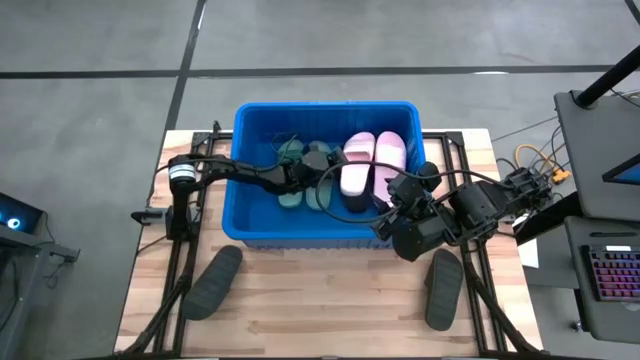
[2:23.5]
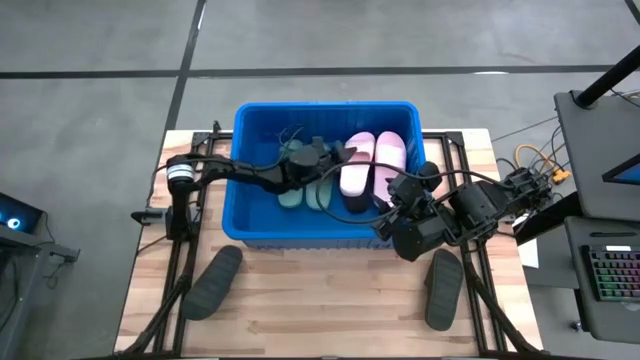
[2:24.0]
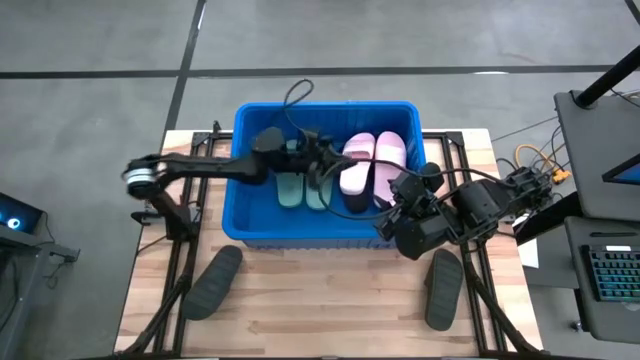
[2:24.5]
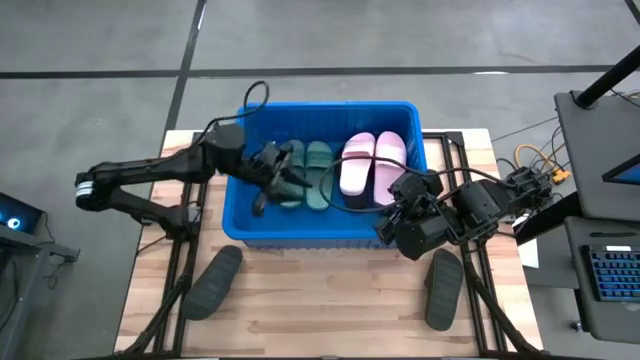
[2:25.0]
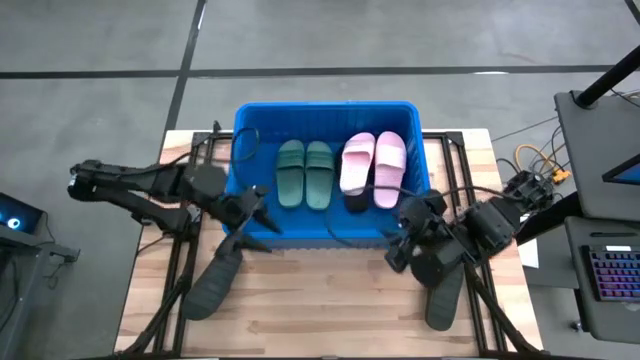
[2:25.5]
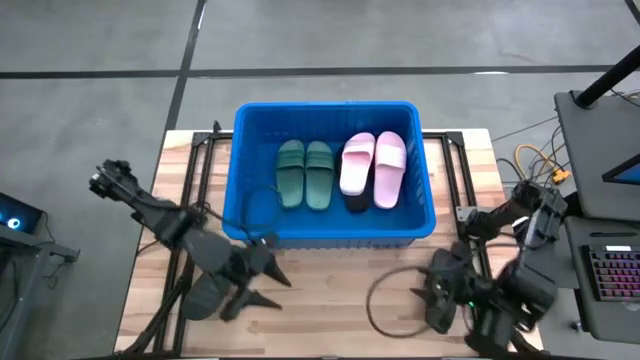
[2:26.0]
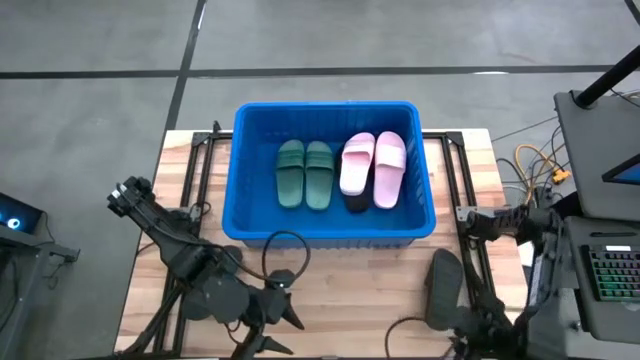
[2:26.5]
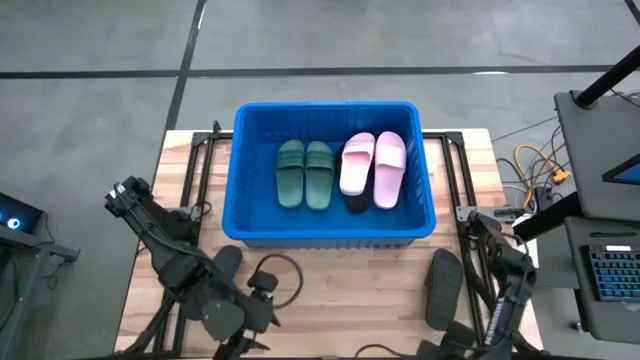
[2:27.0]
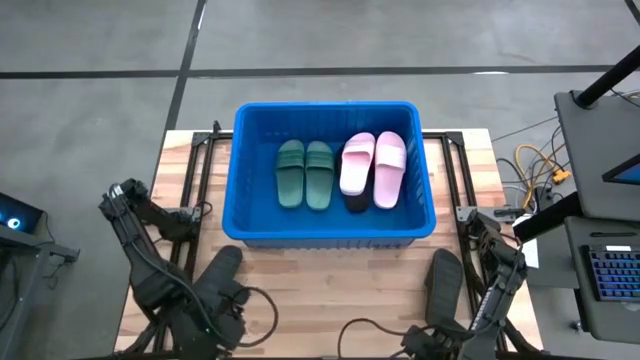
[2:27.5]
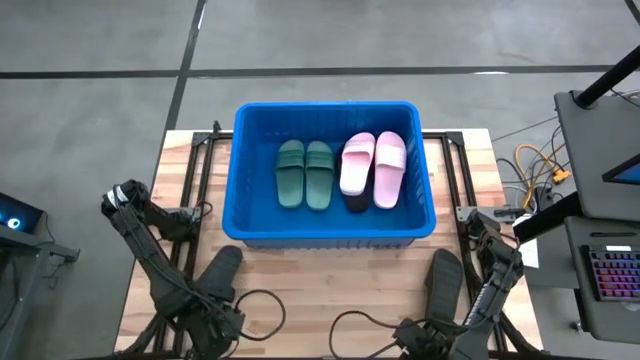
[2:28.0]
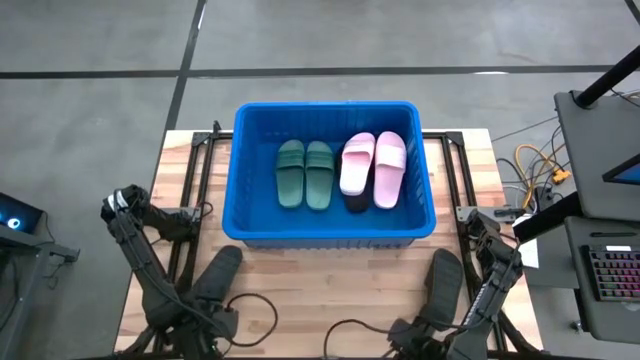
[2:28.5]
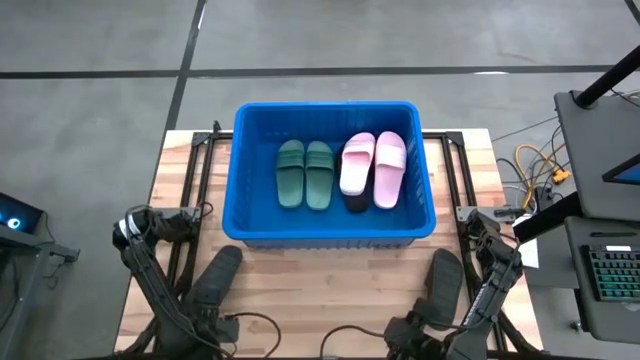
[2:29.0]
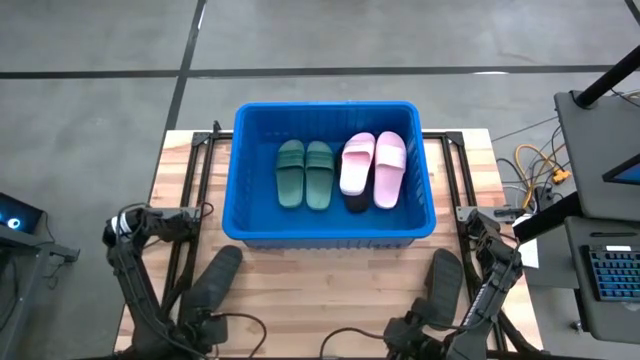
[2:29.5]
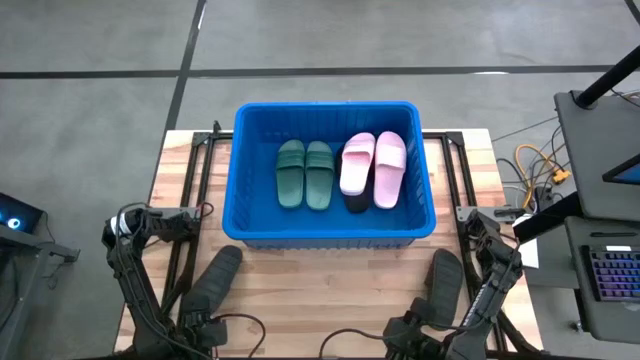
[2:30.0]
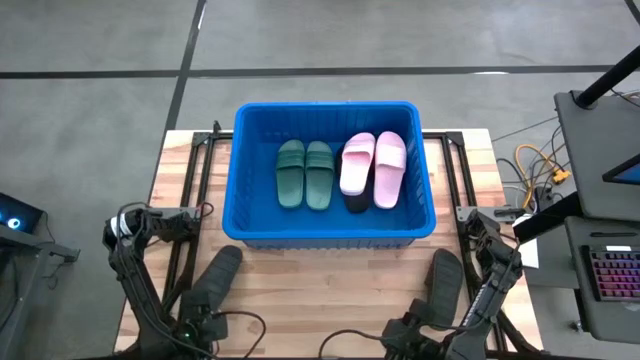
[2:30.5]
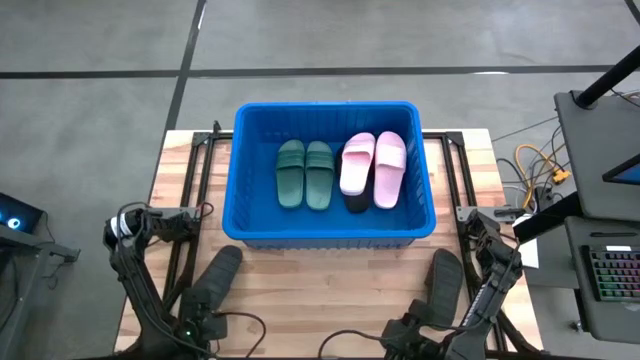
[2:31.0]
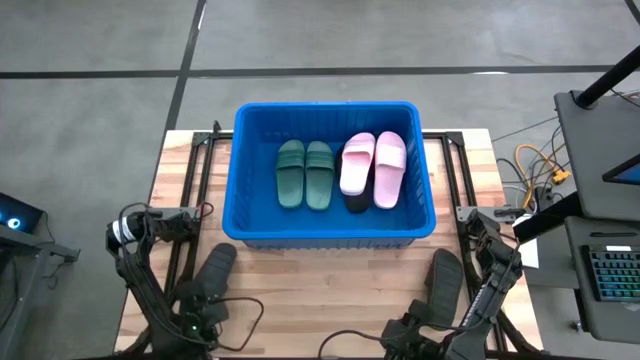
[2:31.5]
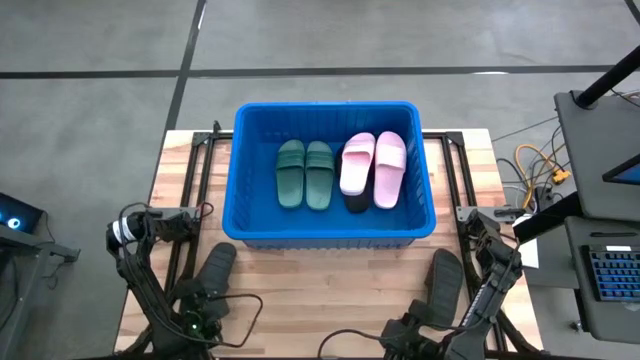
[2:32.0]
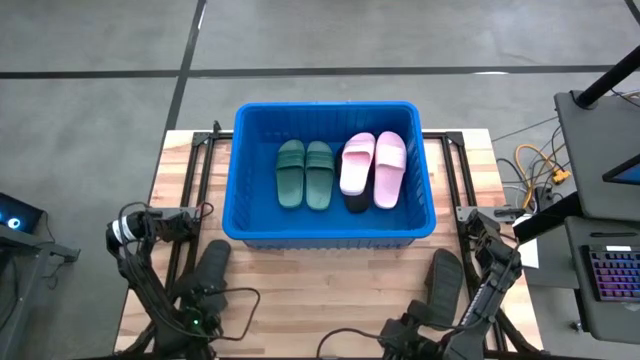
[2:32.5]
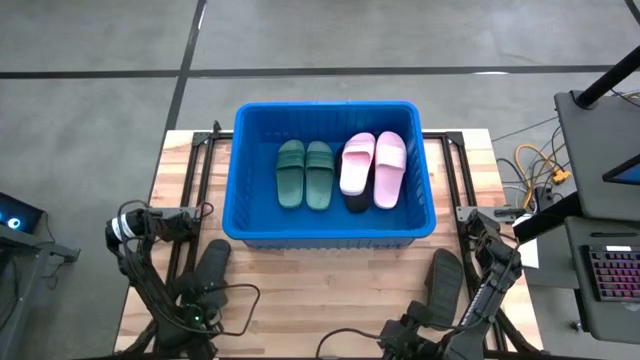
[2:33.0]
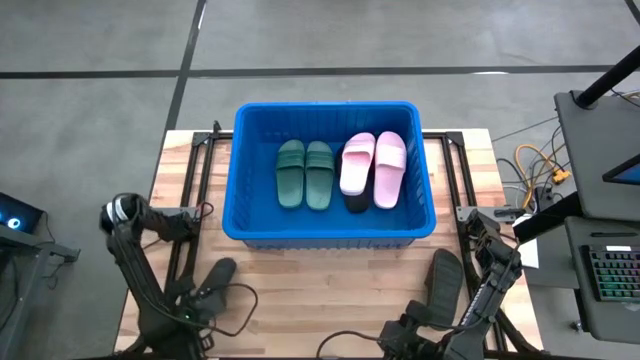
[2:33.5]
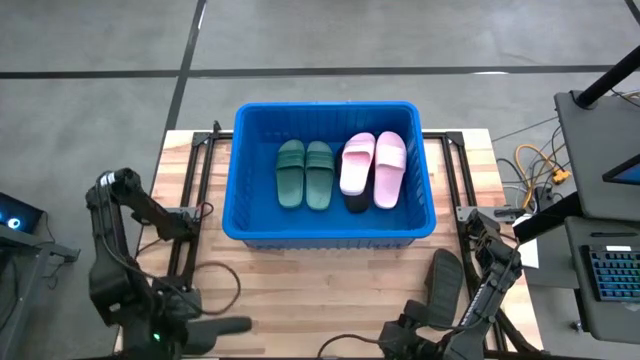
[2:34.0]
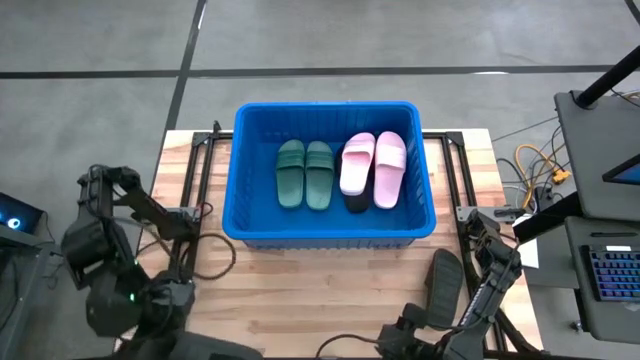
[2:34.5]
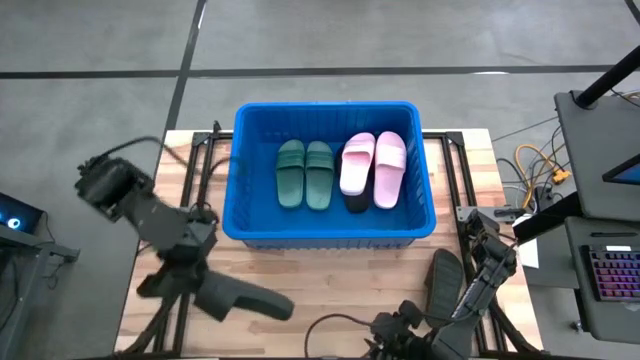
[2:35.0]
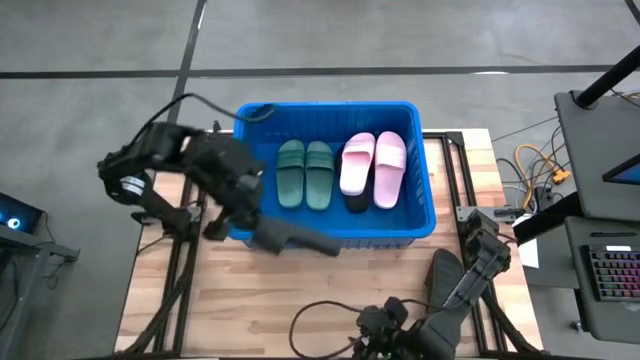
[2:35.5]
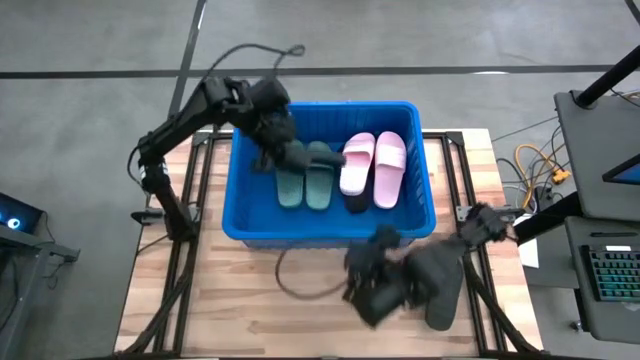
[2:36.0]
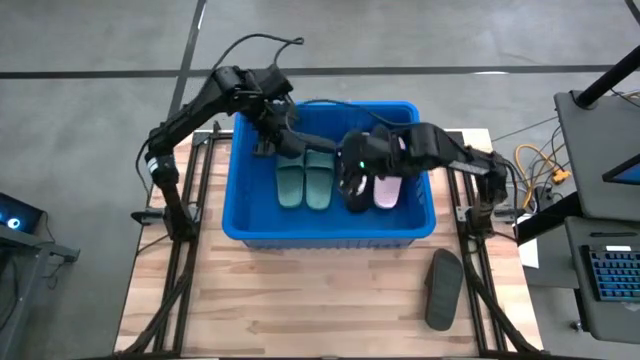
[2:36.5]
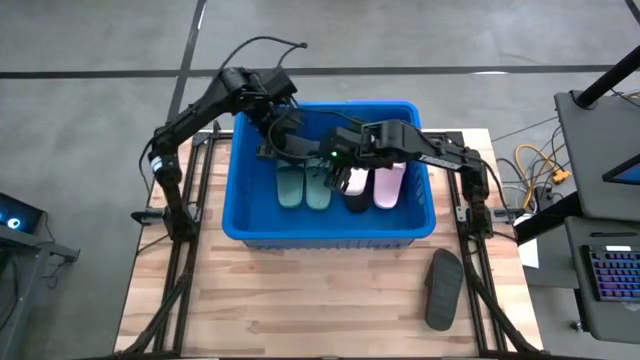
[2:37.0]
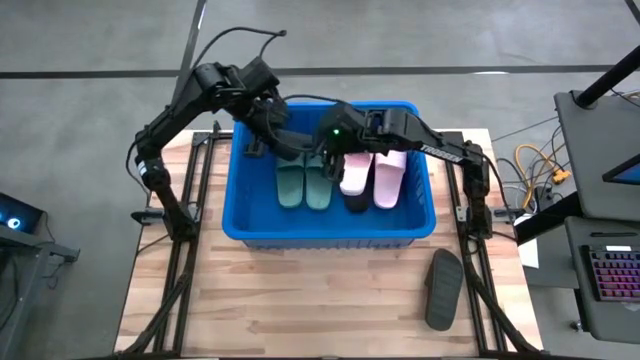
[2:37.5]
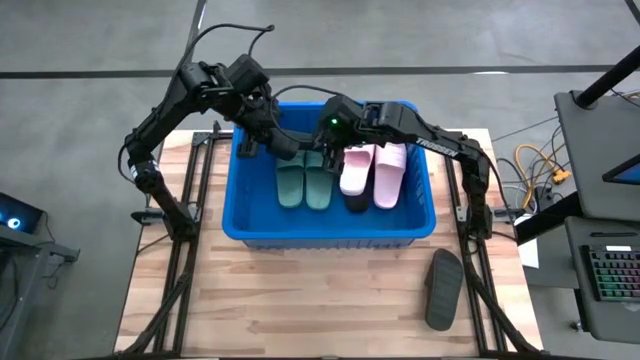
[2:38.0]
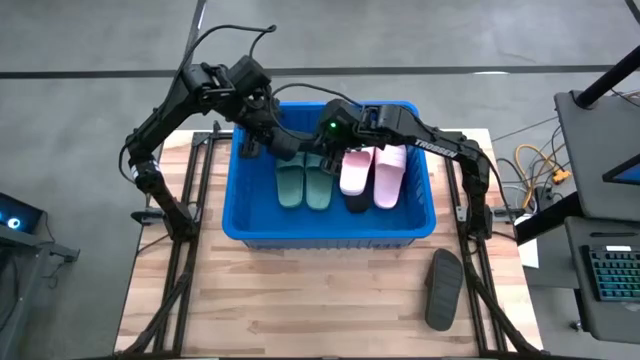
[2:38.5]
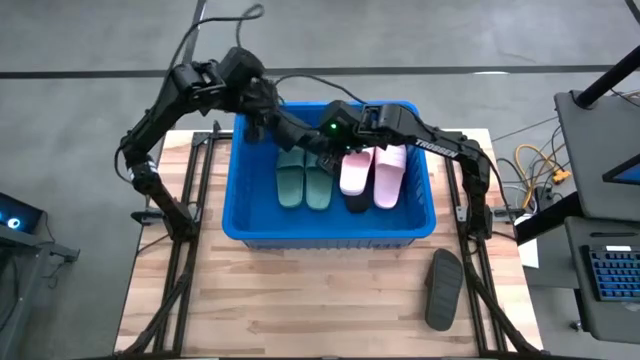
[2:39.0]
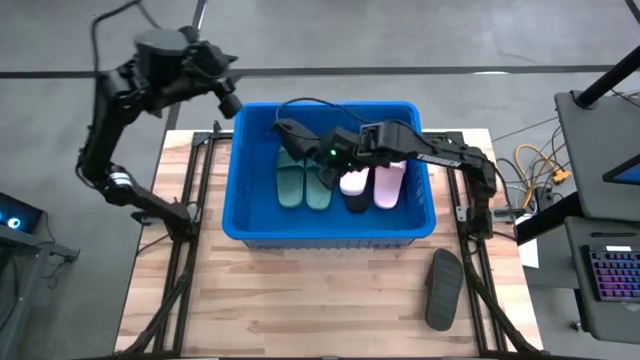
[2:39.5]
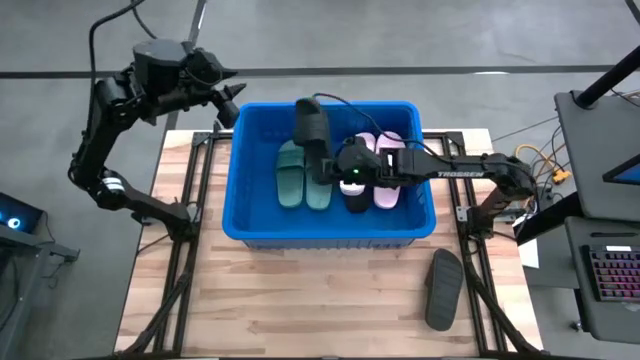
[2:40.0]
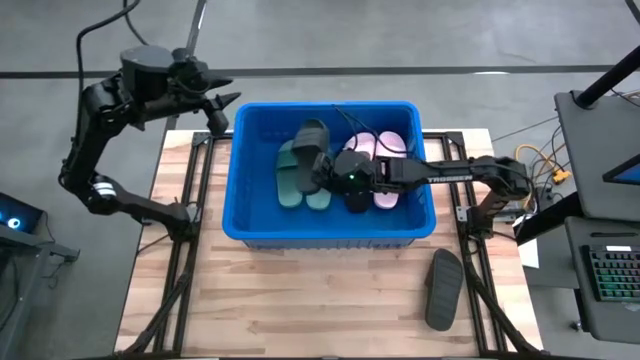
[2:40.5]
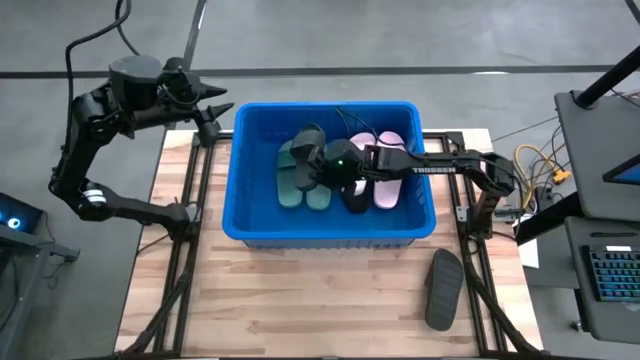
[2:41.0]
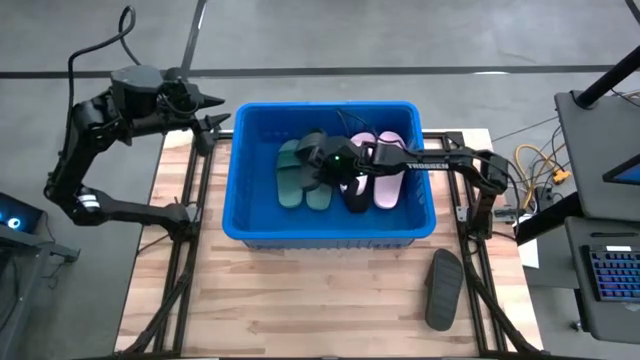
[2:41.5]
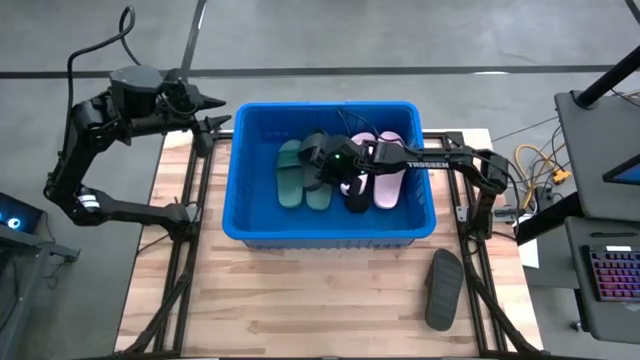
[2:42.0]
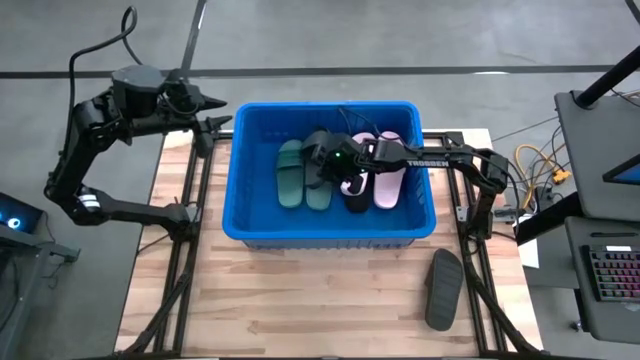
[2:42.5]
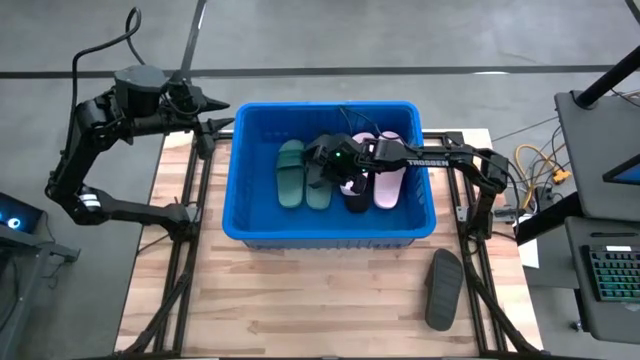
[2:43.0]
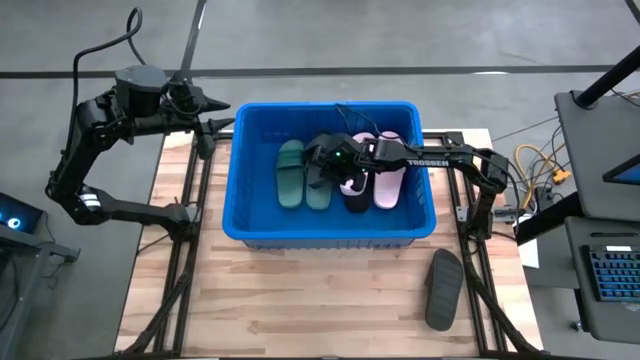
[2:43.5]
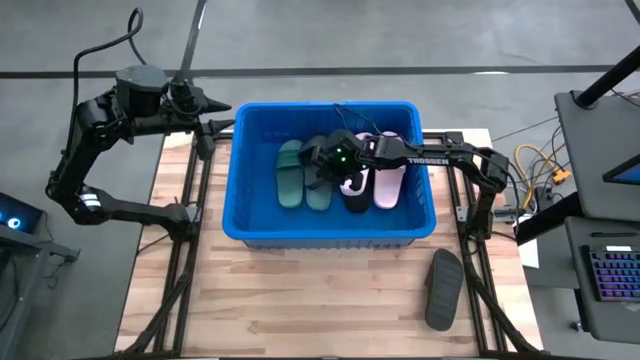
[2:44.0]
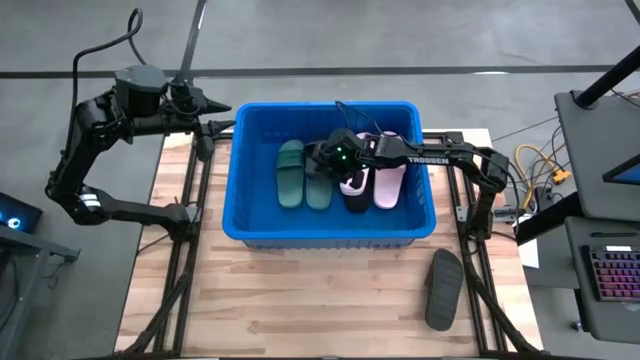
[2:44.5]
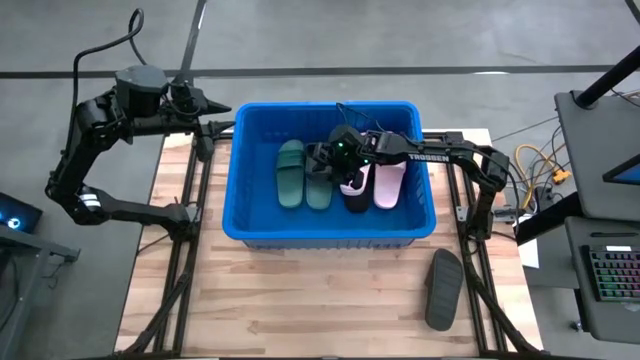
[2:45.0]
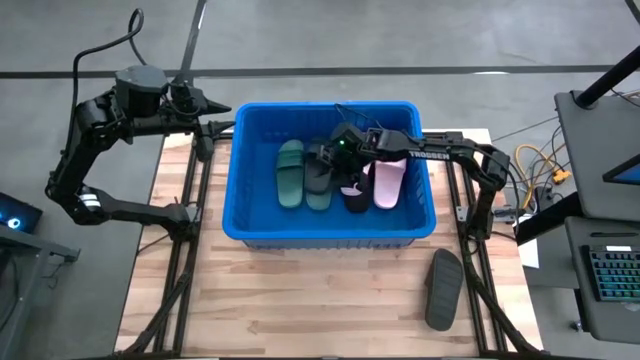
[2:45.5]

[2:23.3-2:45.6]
Task: Pick and place slides into bin
Put the black slide into the bin
